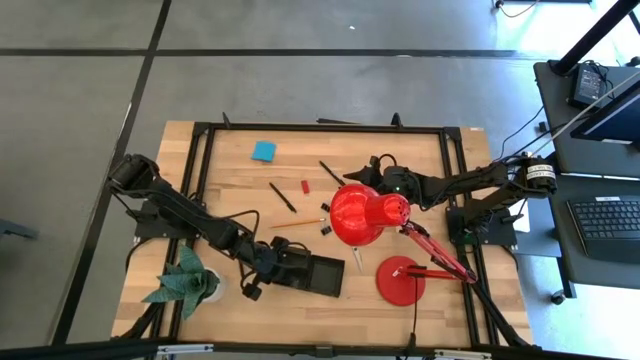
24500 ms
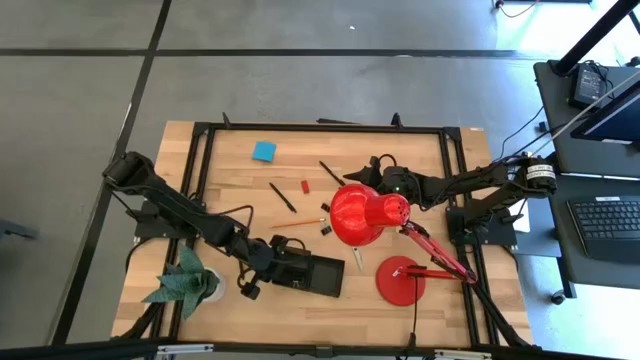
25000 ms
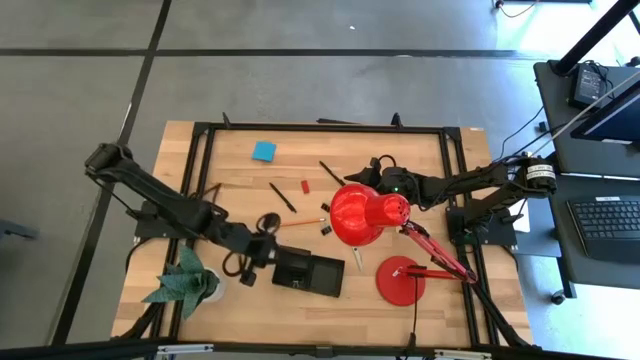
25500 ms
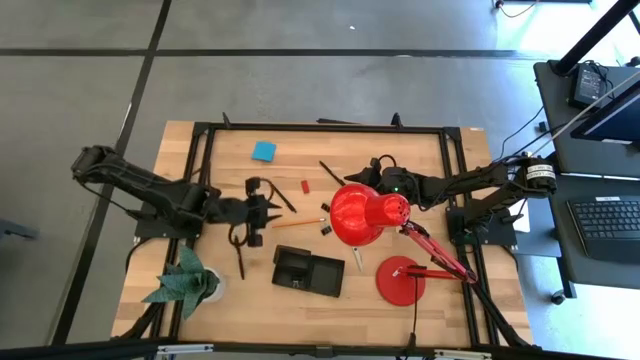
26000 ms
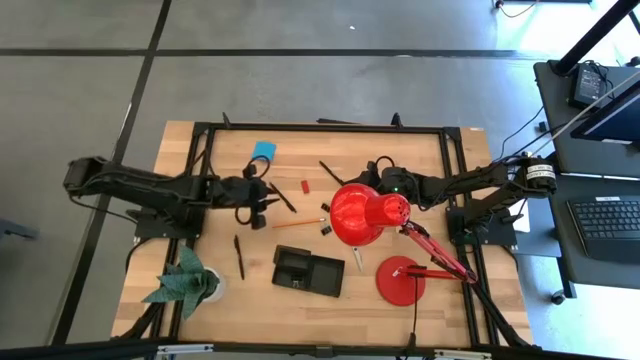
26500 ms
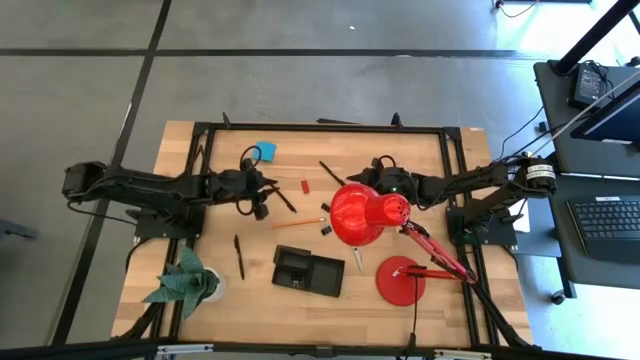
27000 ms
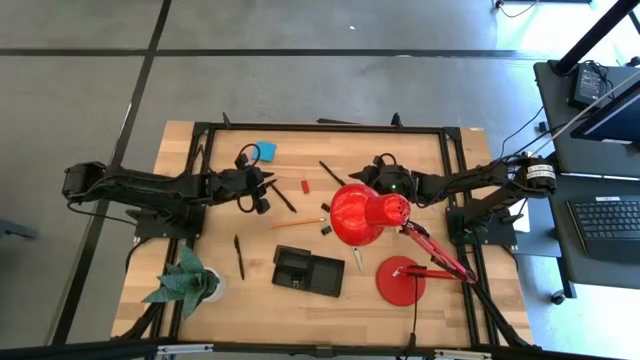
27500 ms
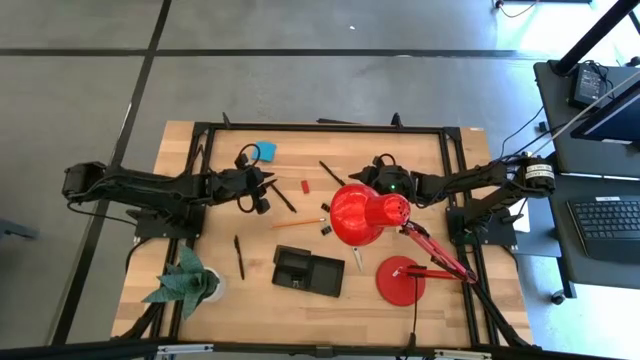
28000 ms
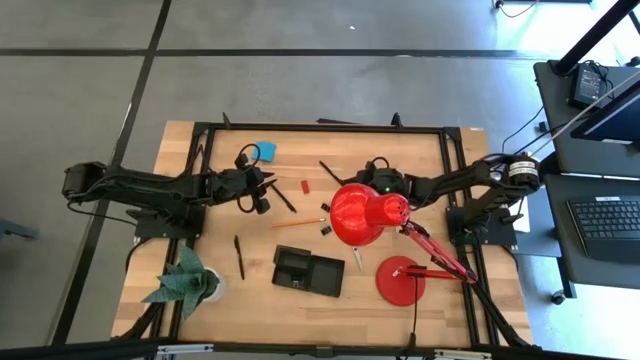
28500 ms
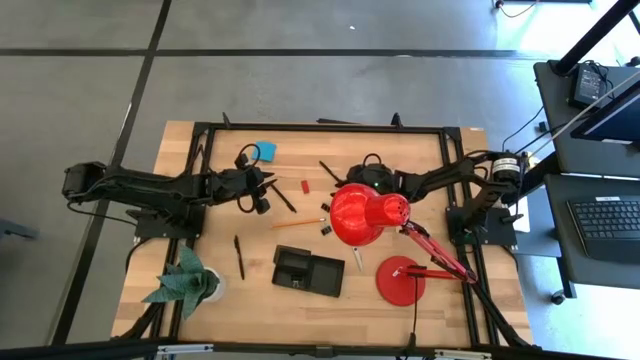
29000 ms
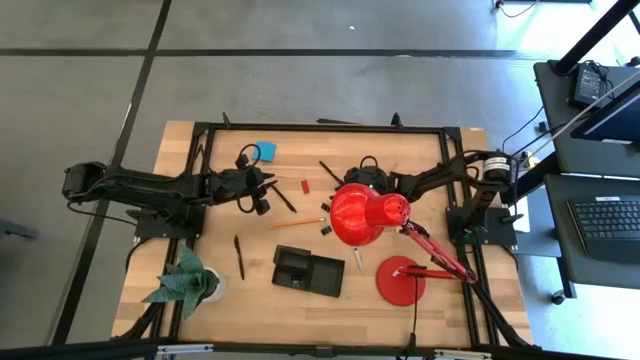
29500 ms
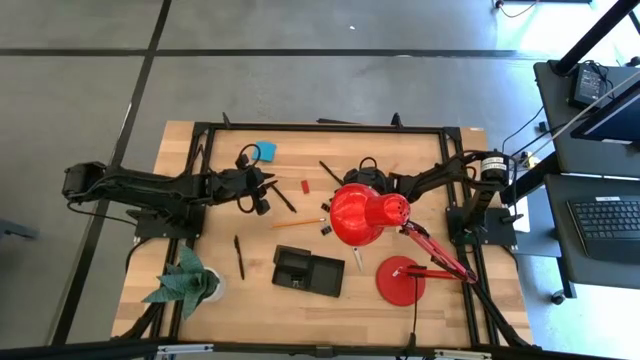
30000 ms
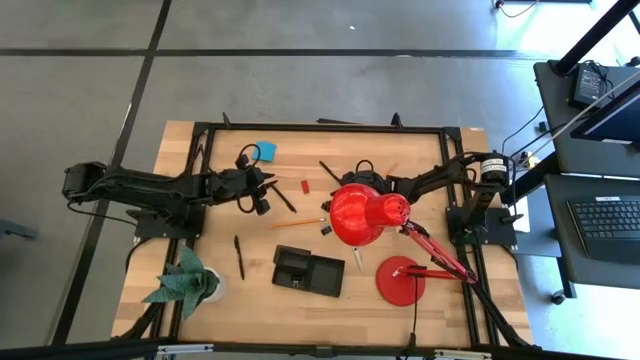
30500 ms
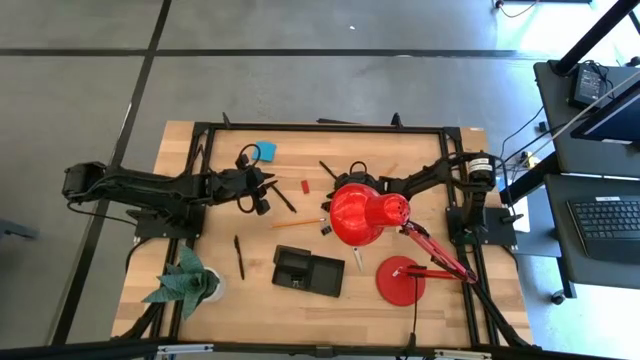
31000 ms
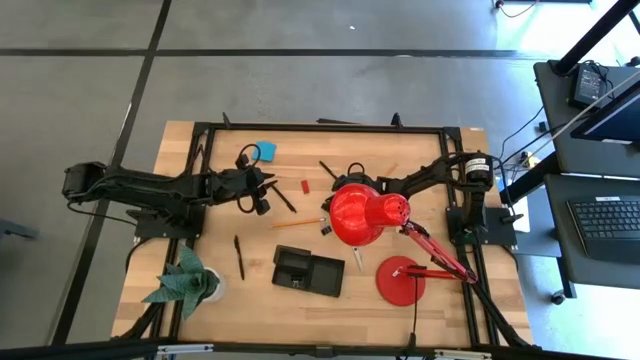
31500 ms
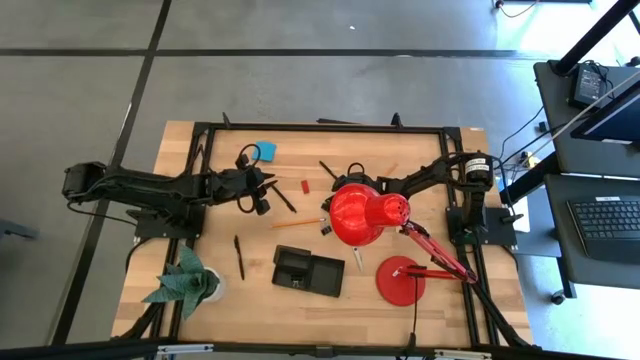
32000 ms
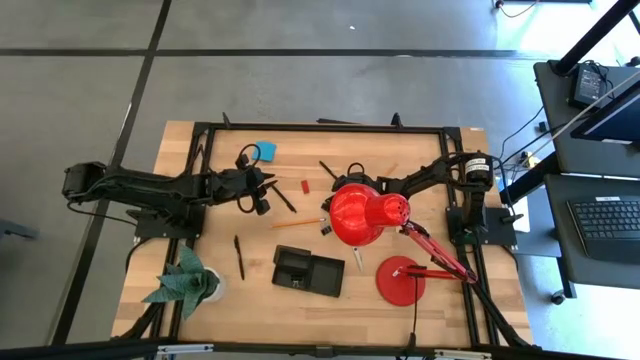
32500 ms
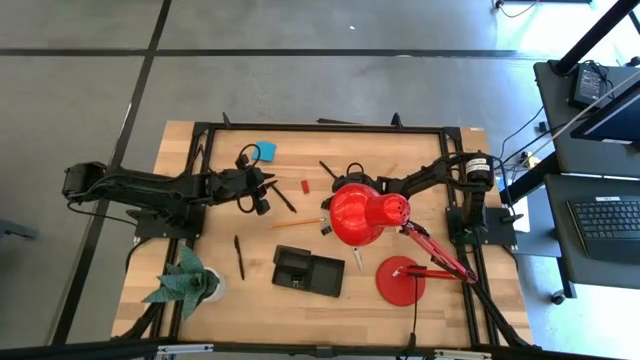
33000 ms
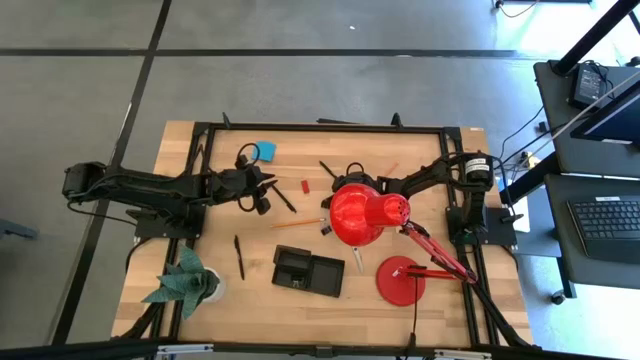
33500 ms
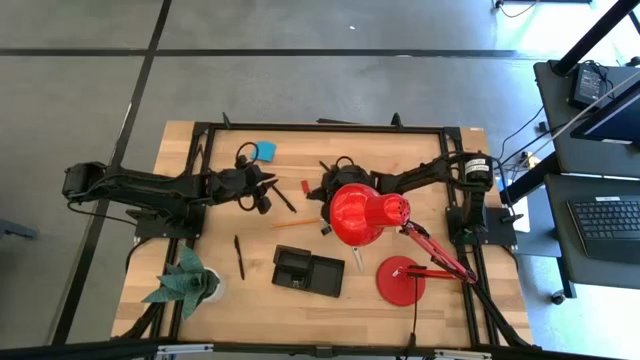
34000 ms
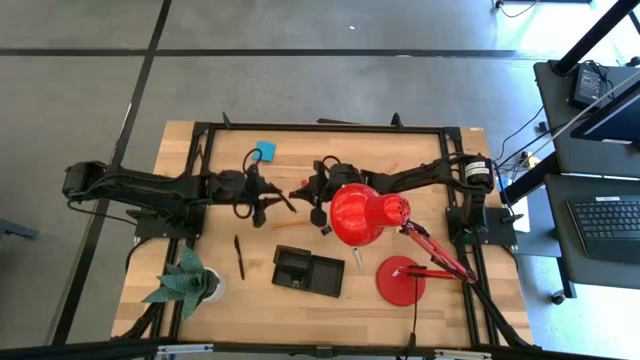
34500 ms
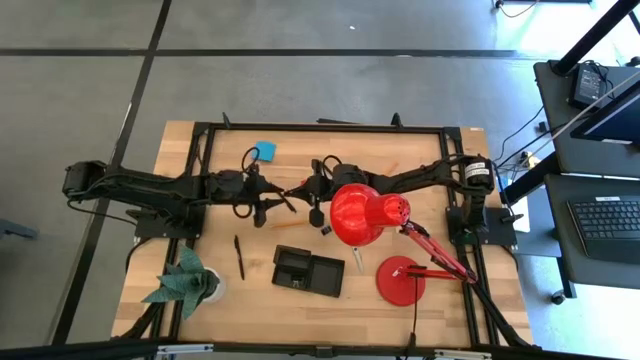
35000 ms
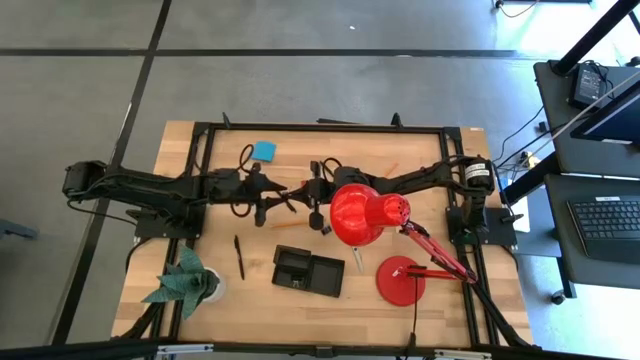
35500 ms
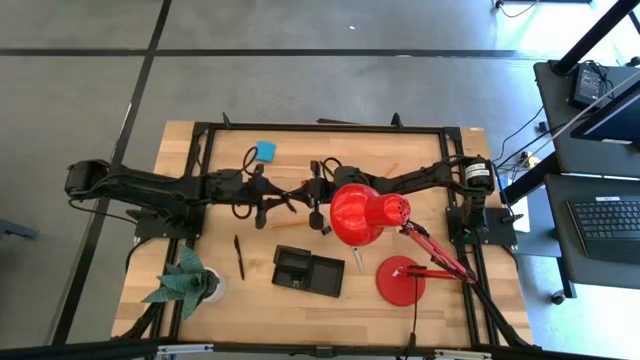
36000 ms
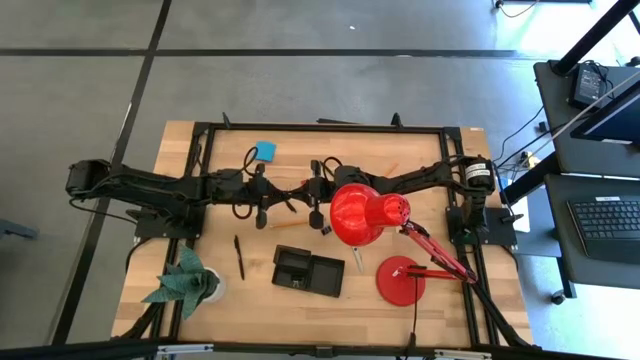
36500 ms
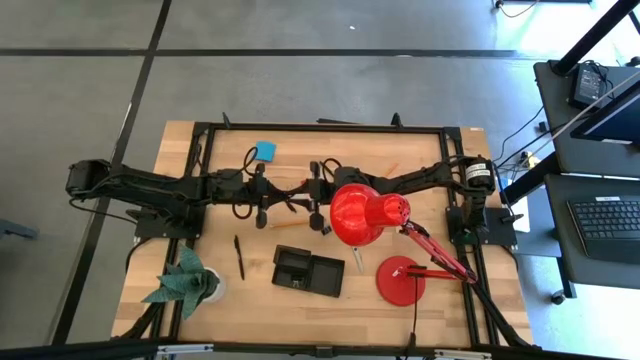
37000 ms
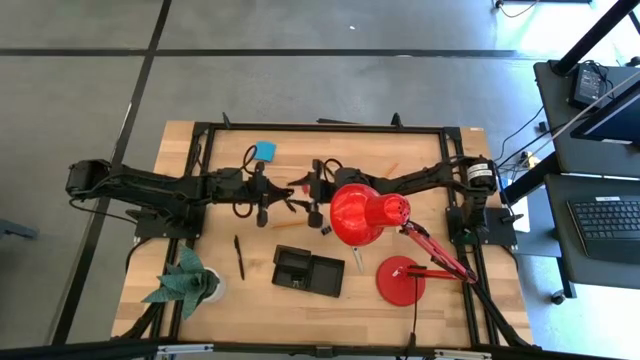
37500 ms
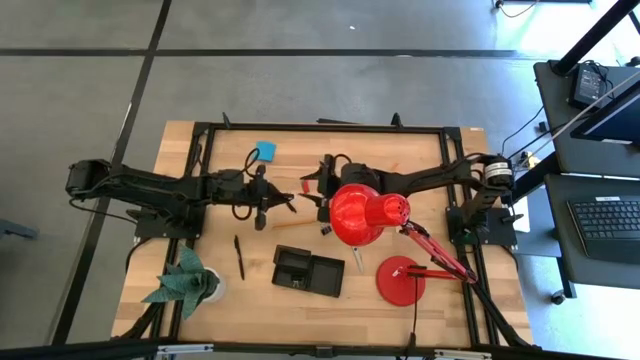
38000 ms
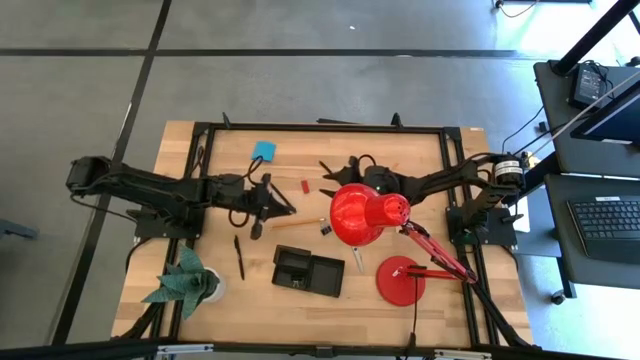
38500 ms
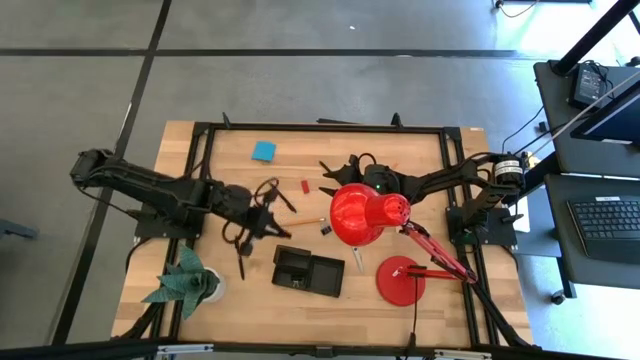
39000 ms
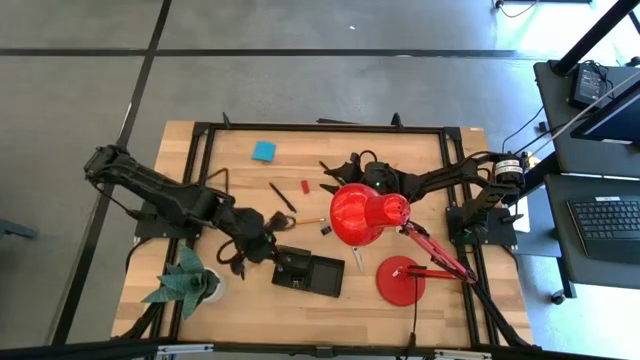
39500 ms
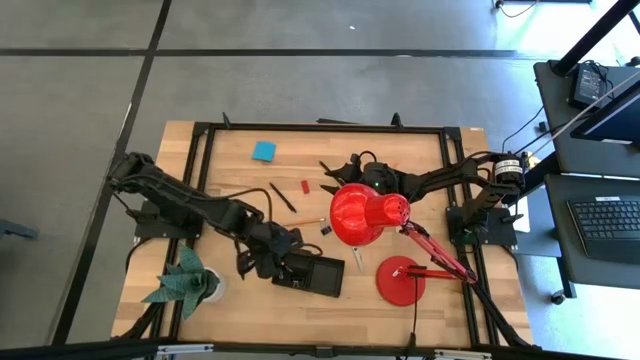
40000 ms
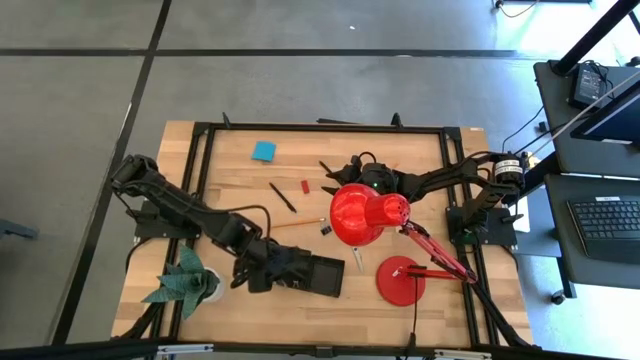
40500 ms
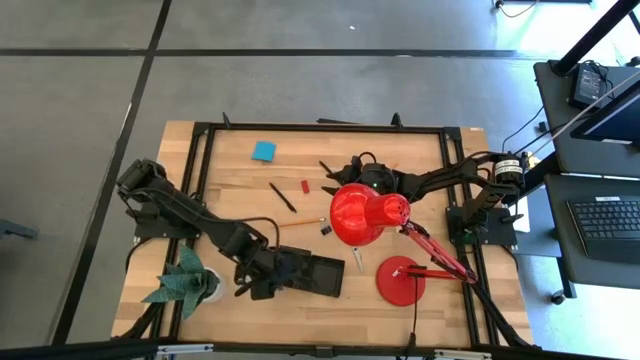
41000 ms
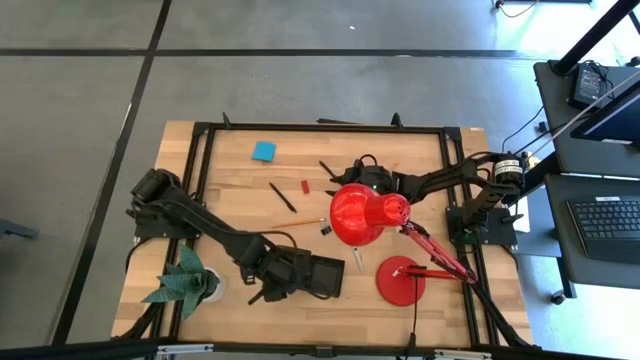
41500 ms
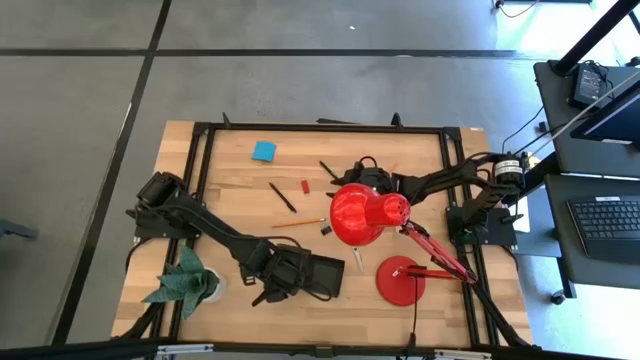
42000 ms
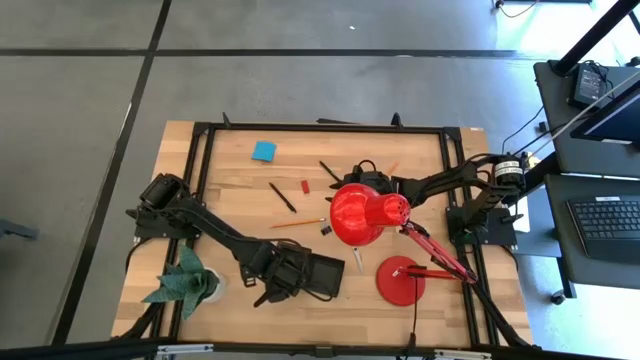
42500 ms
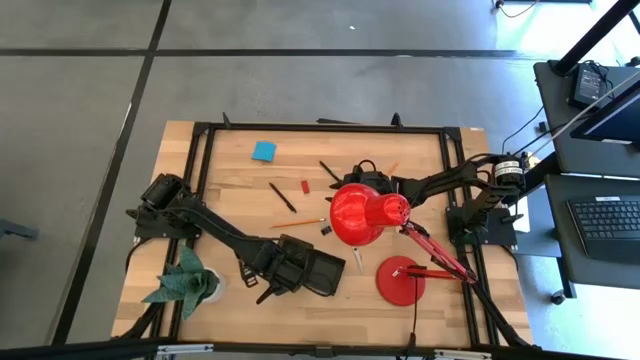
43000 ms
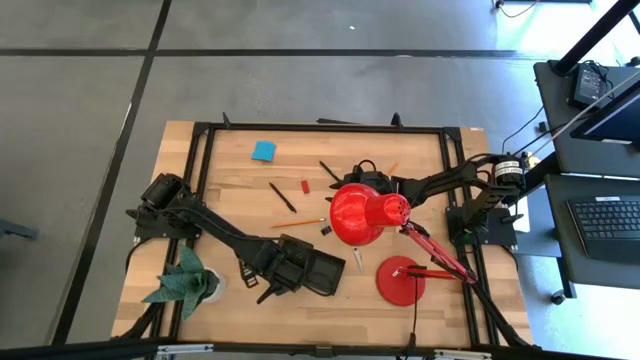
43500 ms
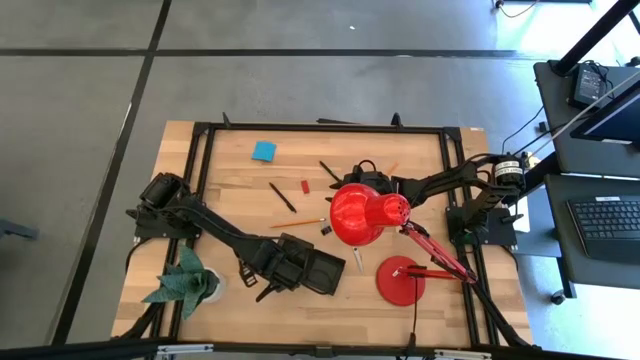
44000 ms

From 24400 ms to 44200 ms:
Task: Pick and place office supplies into organizer
Put the top black clip binder into the desk organizer

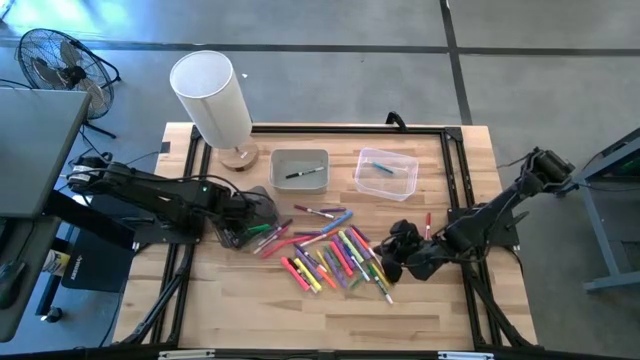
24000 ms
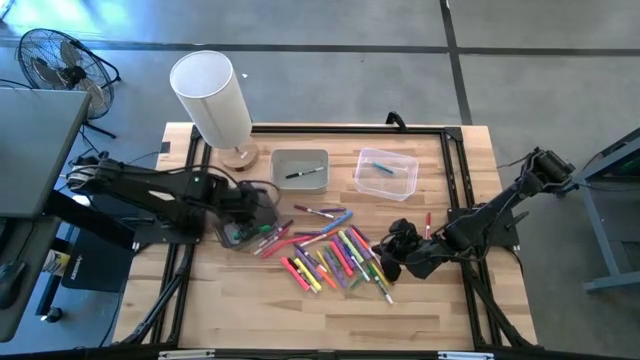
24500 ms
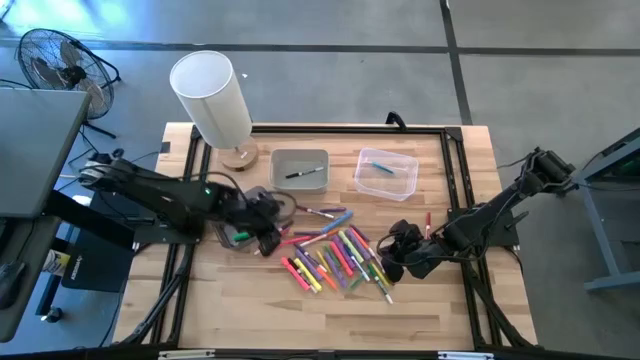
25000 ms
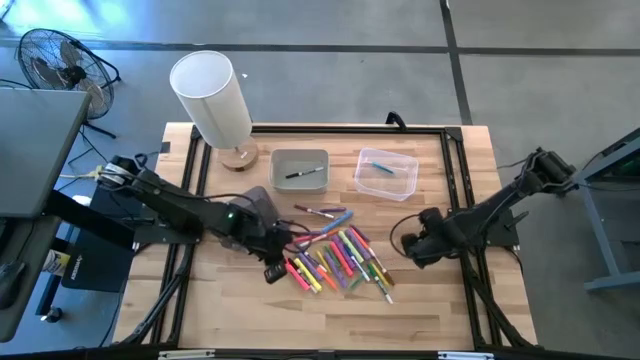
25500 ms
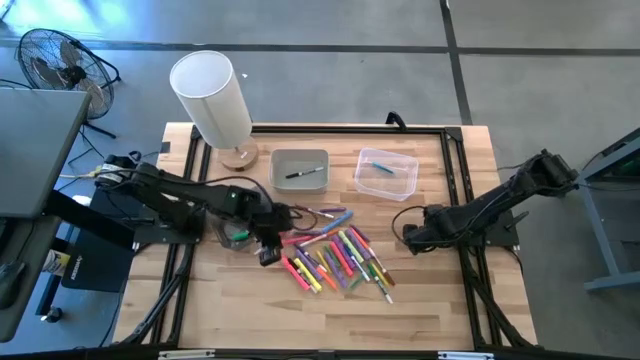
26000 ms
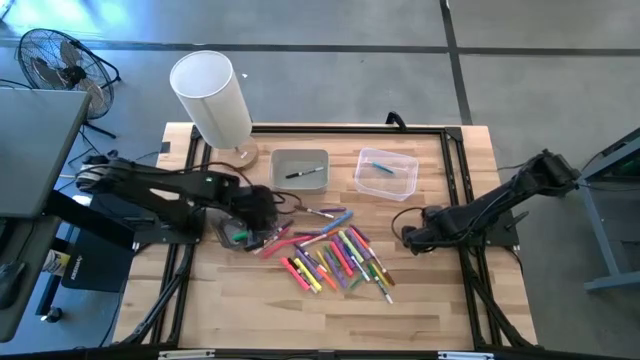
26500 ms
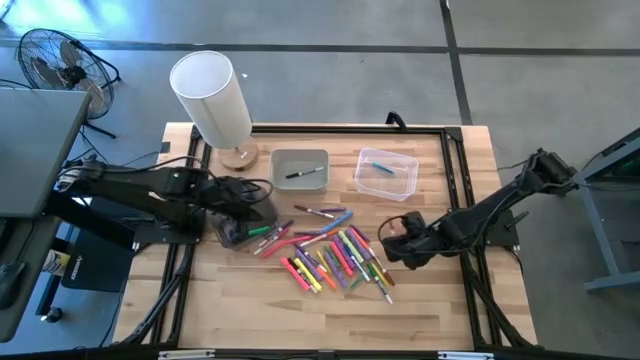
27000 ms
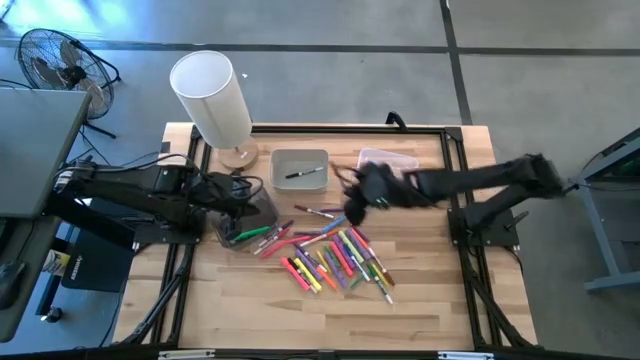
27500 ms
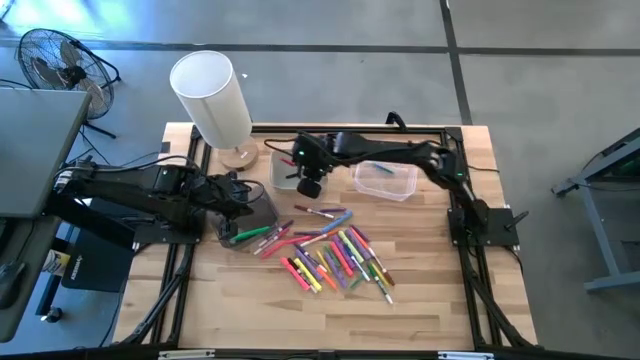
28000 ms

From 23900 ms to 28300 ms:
Task: Pick & Place Markers
Put the red marker pen into the white bin
